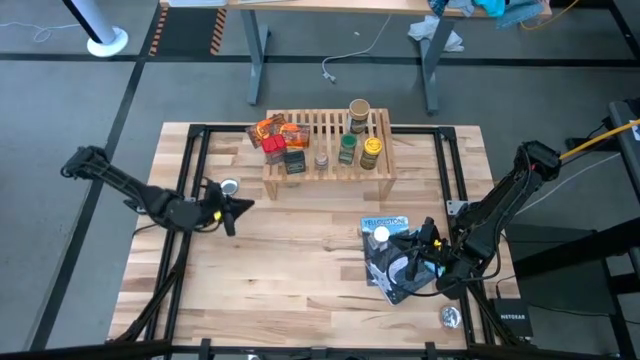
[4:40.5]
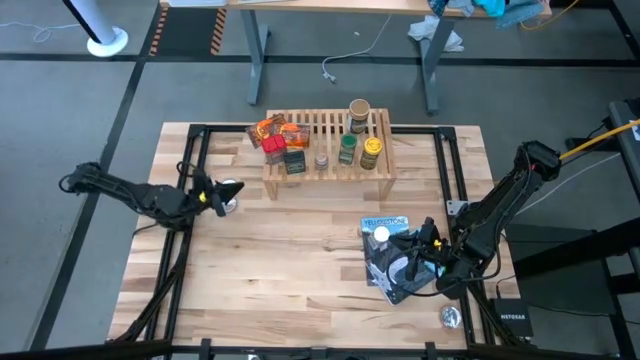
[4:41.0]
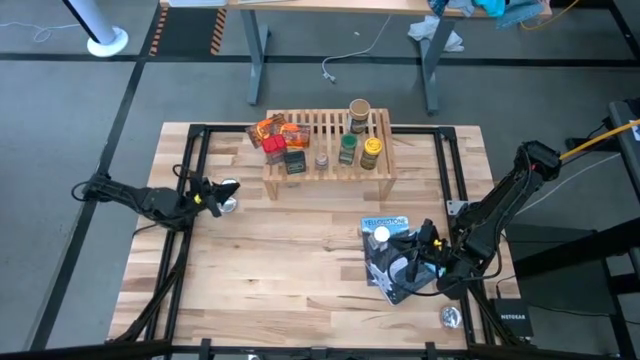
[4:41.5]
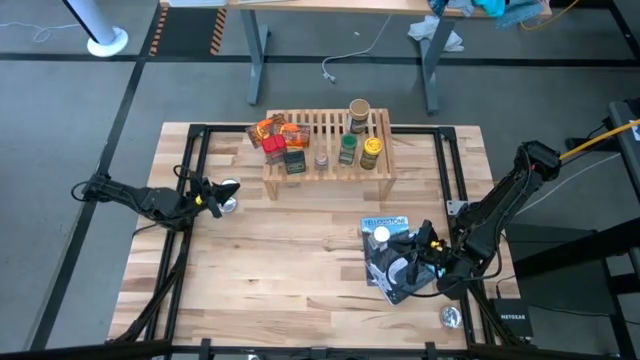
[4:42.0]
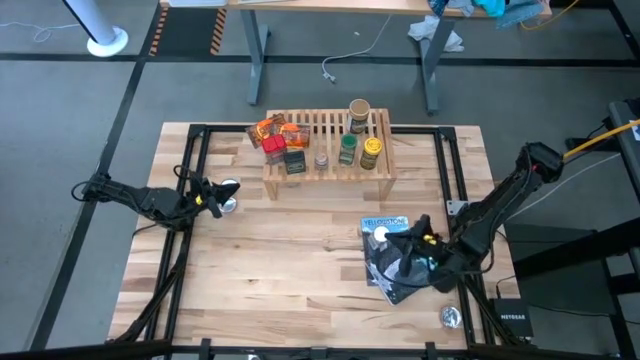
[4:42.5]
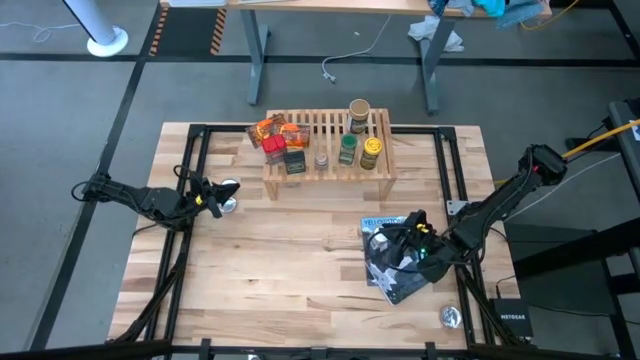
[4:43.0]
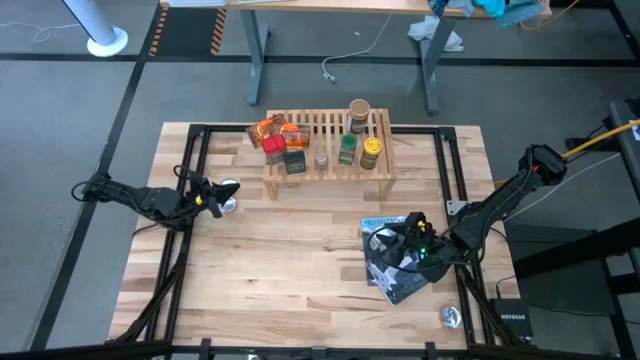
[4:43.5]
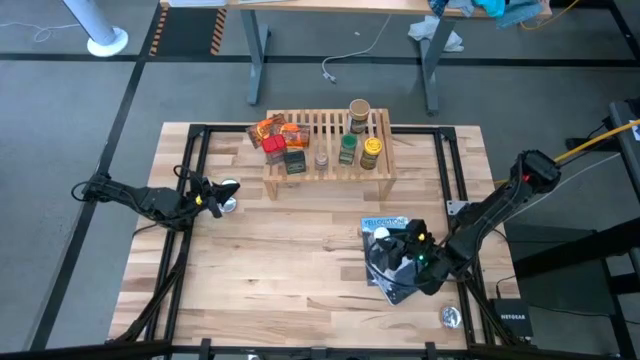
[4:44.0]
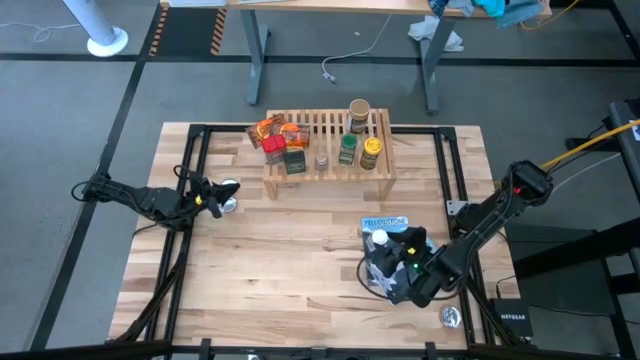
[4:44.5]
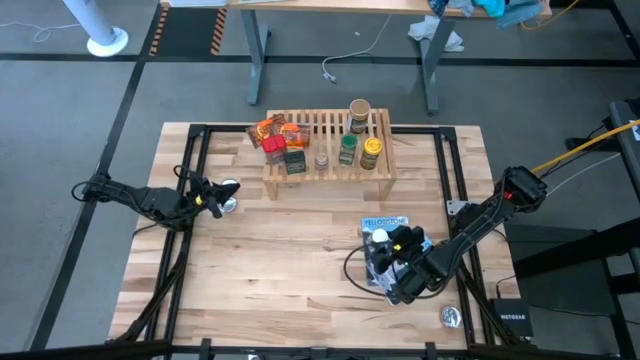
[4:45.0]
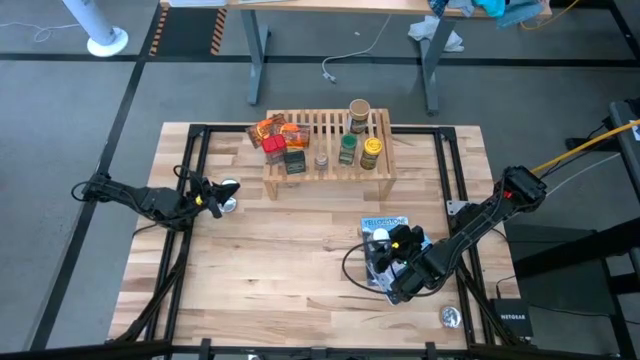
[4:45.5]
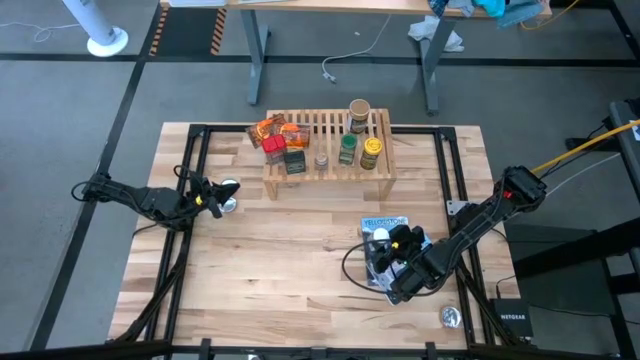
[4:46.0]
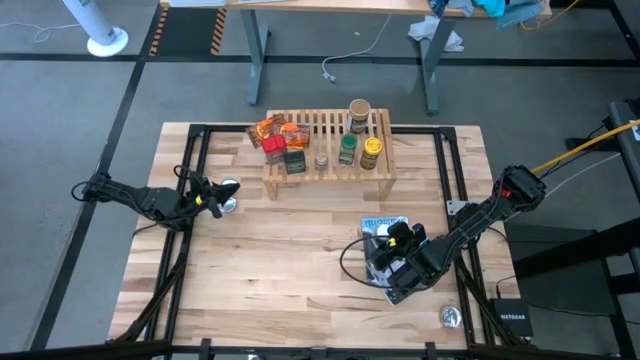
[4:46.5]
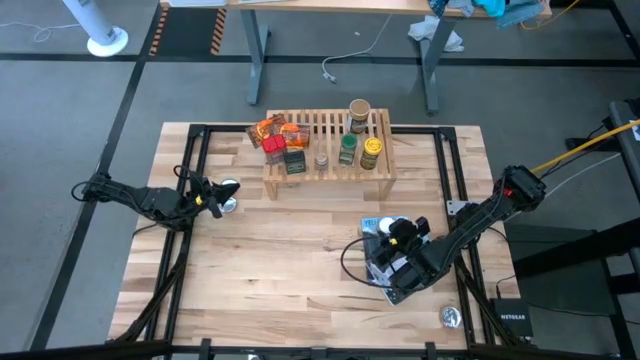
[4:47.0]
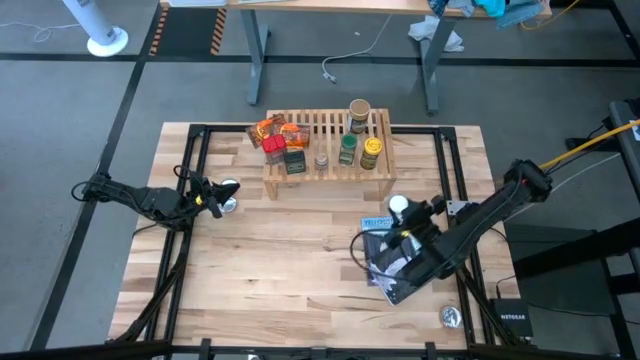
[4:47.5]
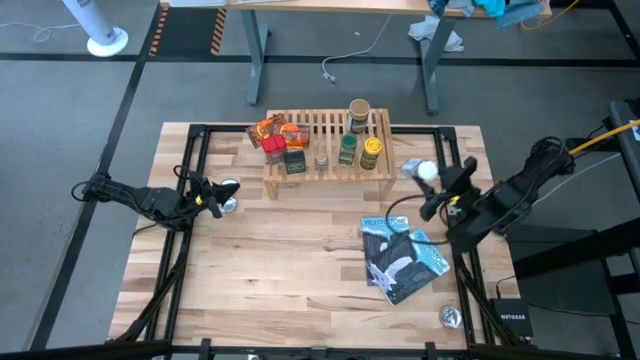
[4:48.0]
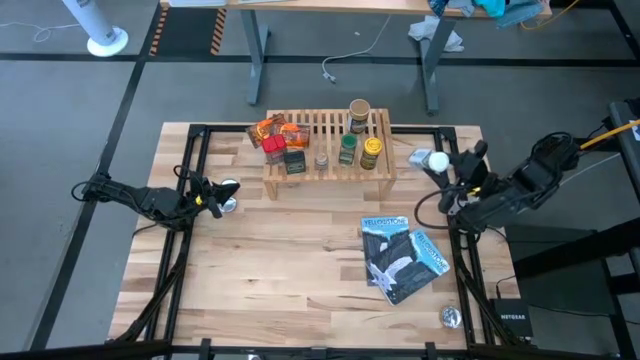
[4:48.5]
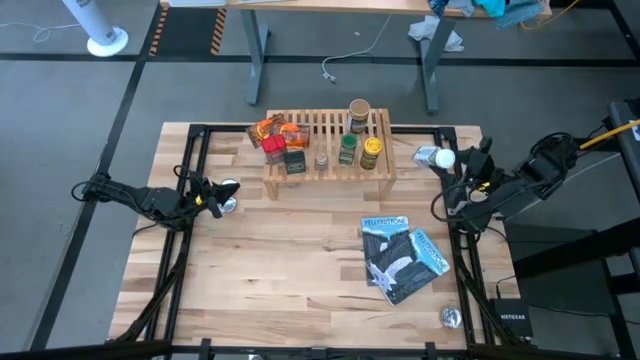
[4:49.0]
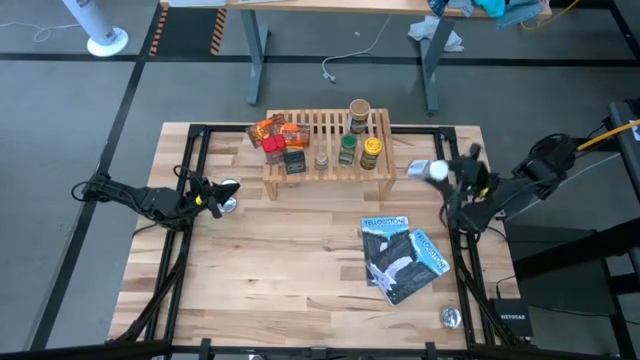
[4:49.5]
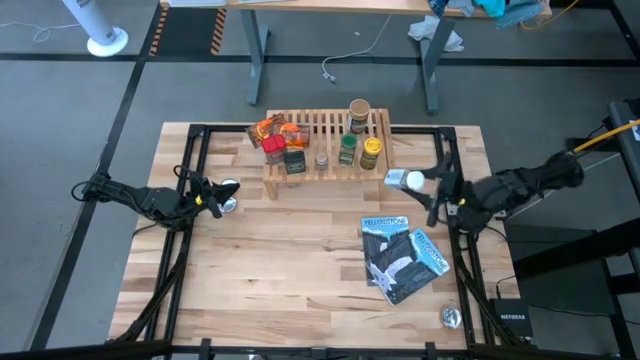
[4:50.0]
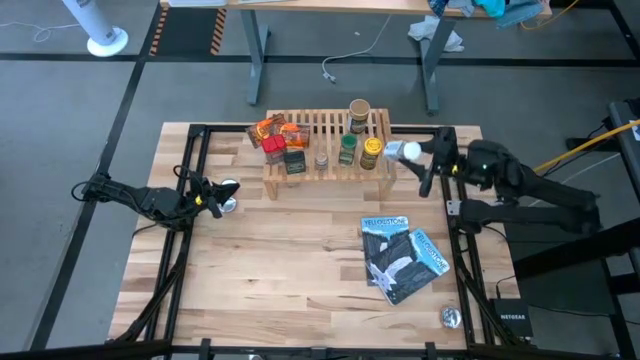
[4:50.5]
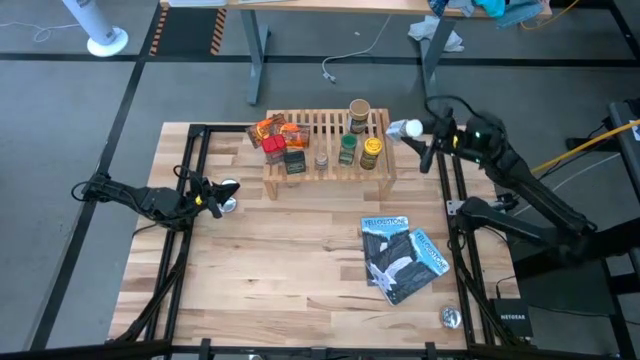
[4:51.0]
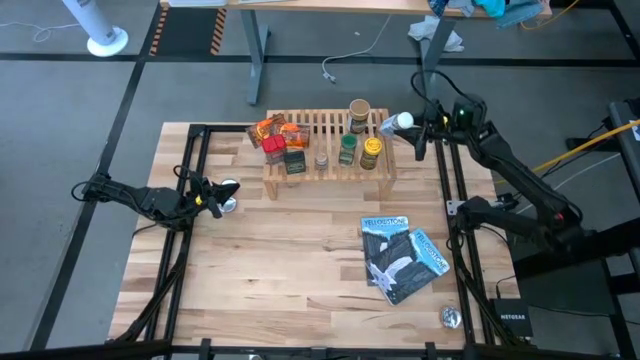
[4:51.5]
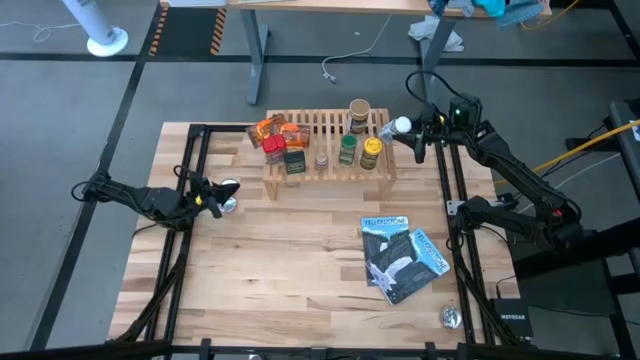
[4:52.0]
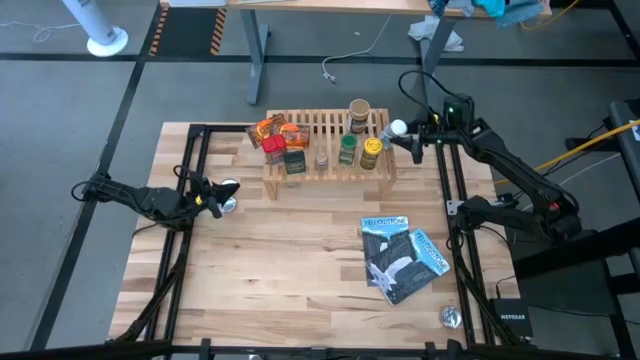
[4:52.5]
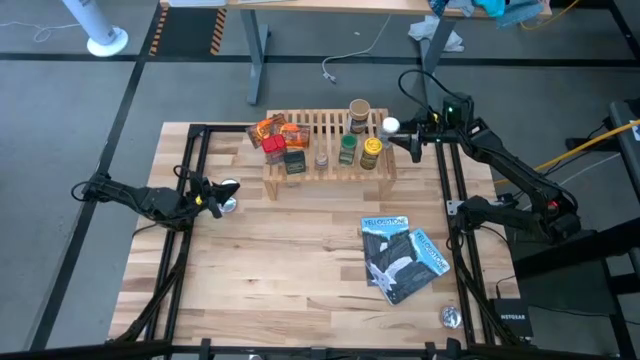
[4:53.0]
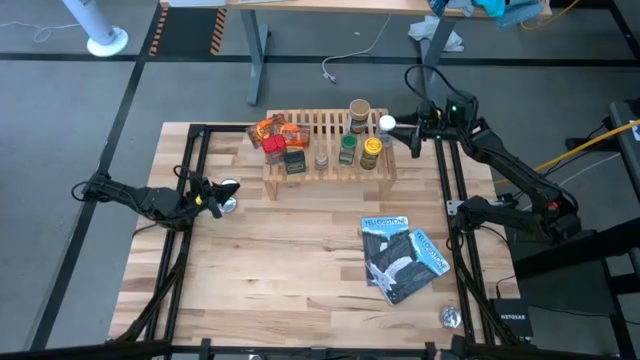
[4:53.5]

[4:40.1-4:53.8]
Task: Shelf spices
Put the white seasoning bottle on the shelf

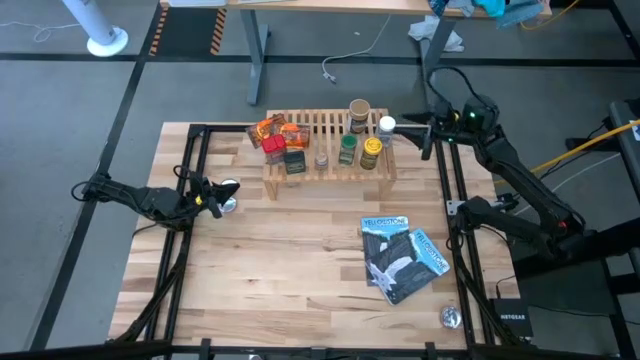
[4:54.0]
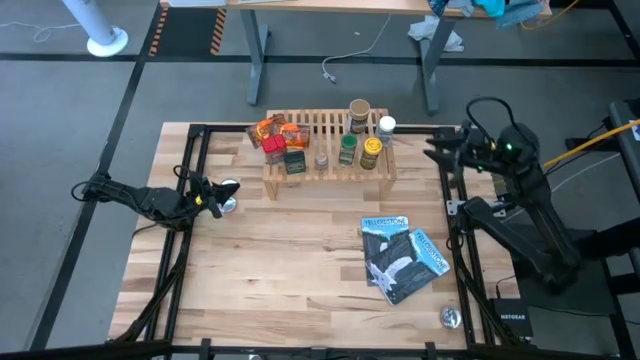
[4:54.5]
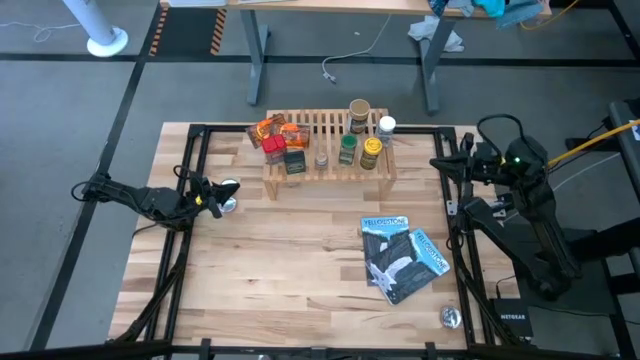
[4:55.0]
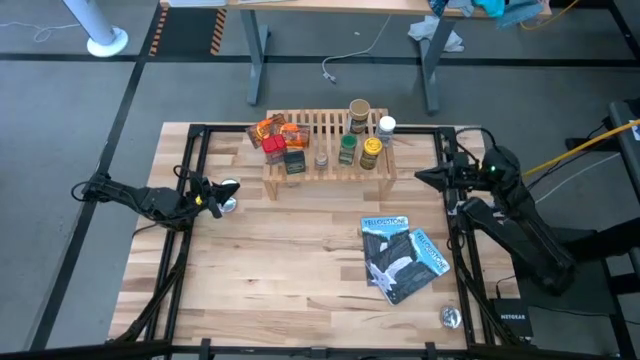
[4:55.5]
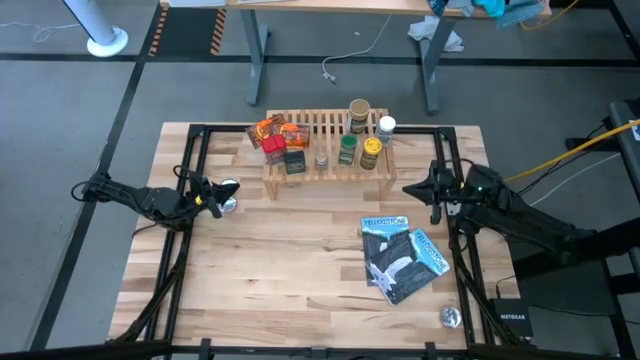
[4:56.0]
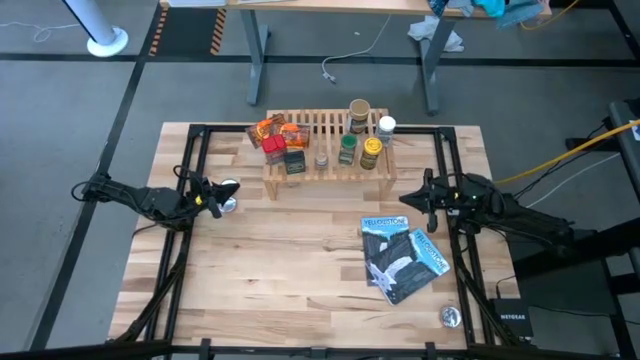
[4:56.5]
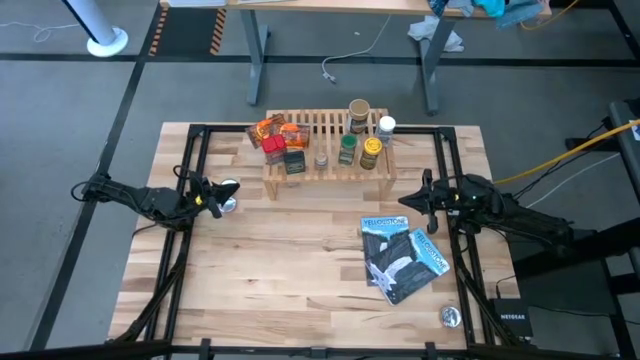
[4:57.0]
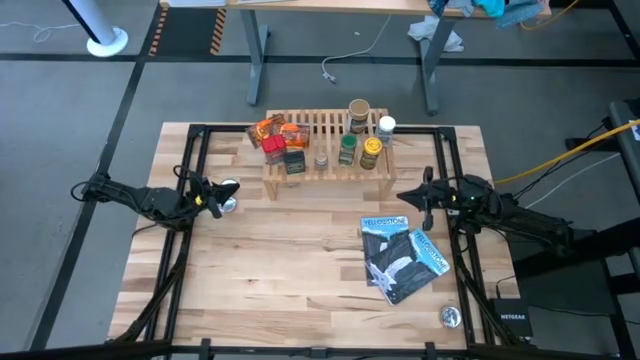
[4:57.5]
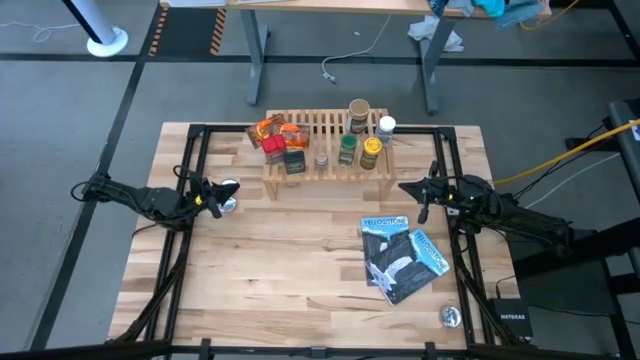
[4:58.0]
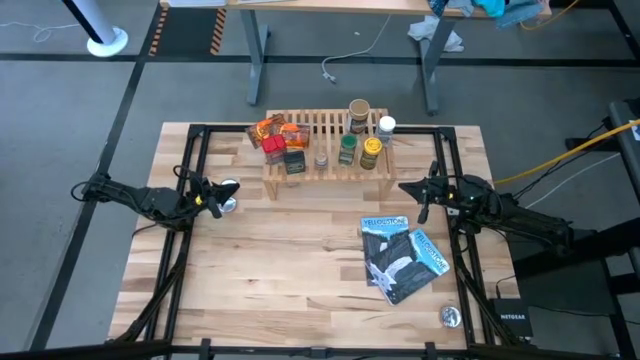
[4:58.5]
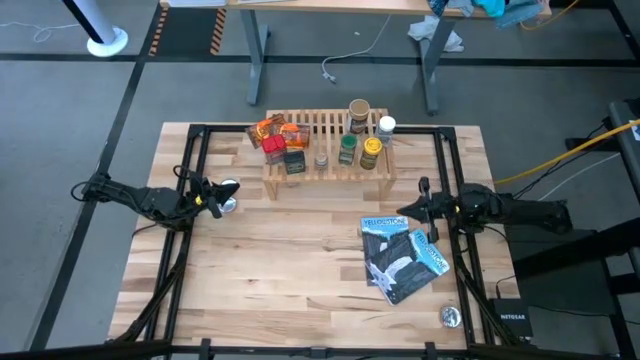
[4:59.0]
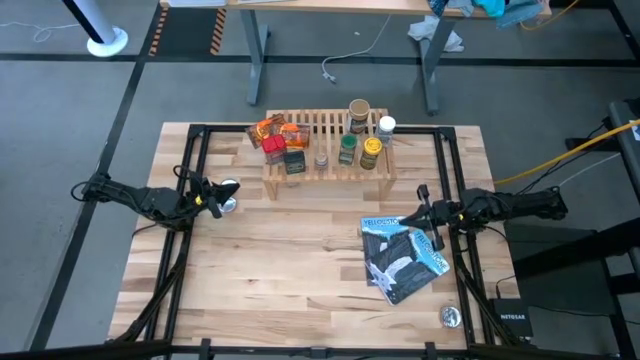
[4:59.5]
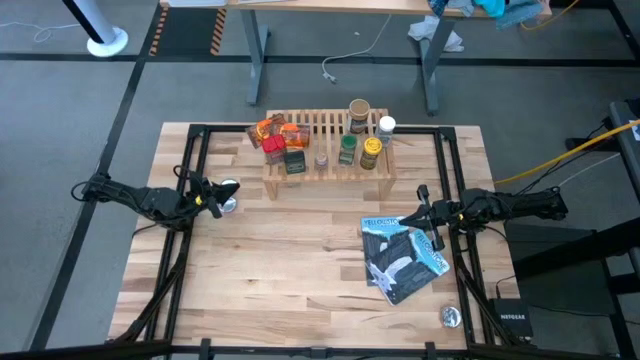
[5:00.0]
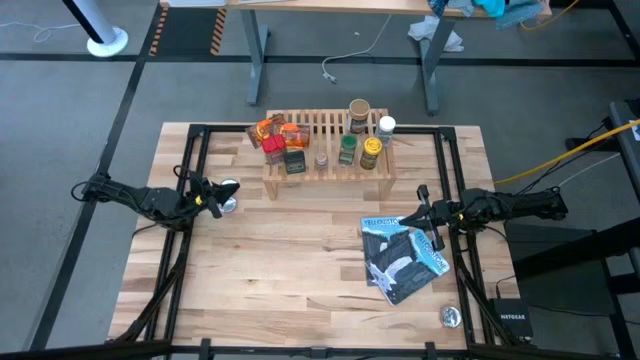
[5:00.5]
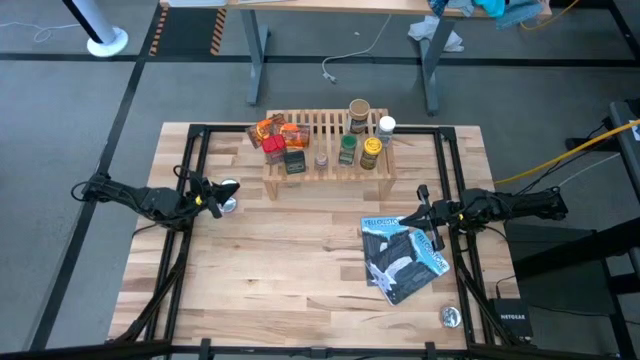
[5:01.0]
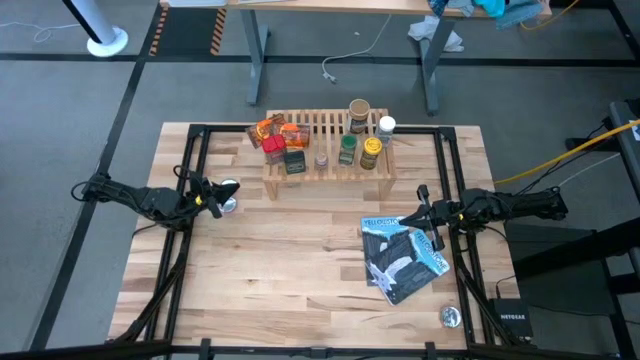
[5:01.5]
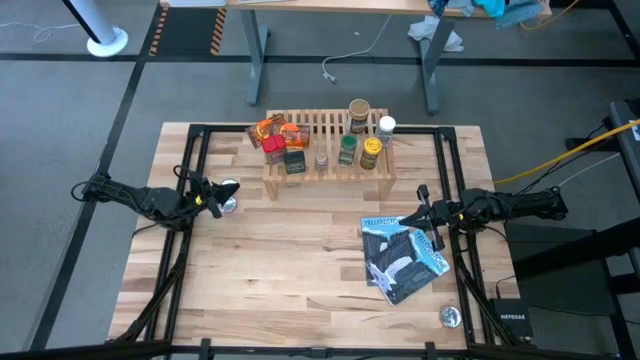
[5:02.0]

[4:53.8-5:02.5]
Return to Home Position

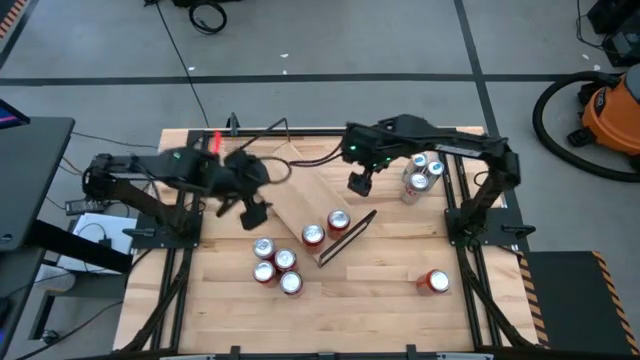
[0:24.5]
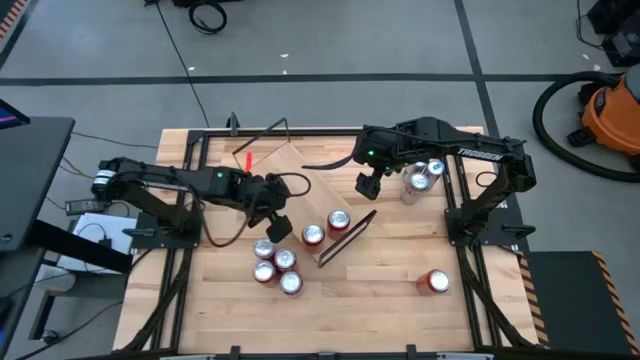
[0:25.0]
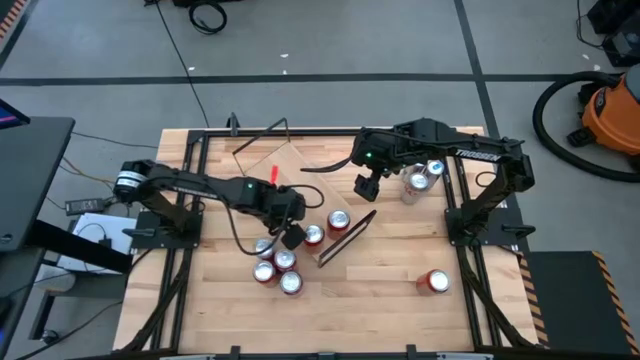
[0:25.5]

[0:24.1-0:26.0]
Task: Place canned beverage on shelf
Adjust the red and black soda can on the shelf
